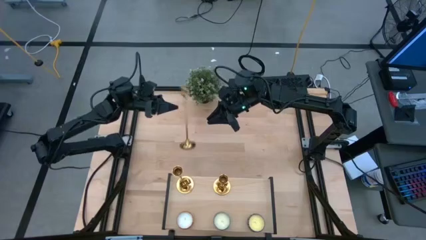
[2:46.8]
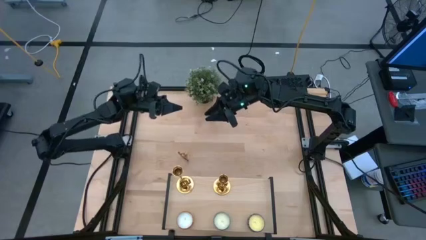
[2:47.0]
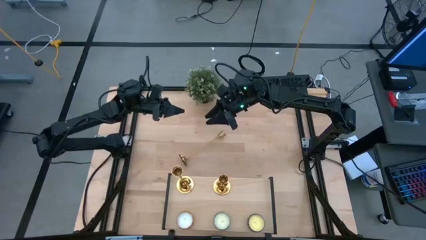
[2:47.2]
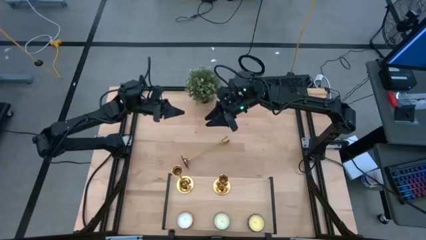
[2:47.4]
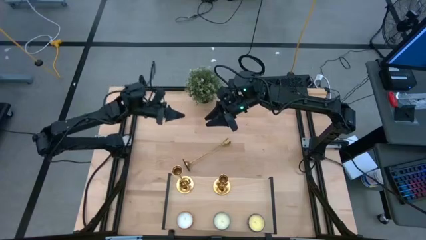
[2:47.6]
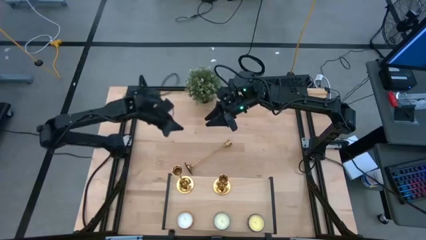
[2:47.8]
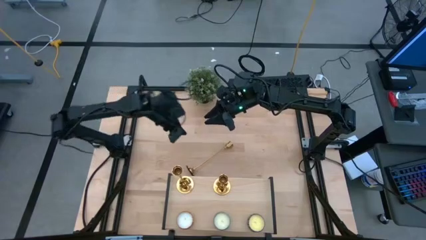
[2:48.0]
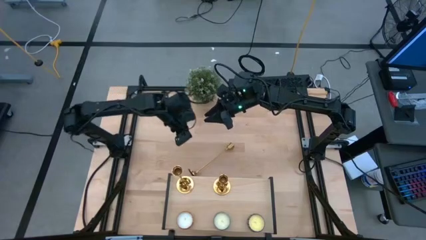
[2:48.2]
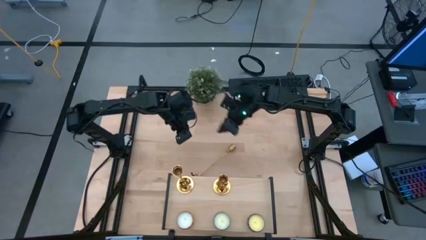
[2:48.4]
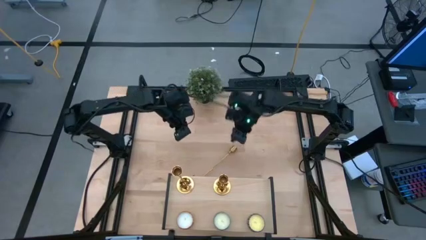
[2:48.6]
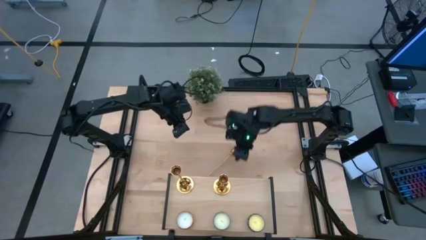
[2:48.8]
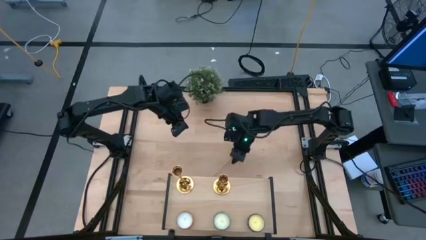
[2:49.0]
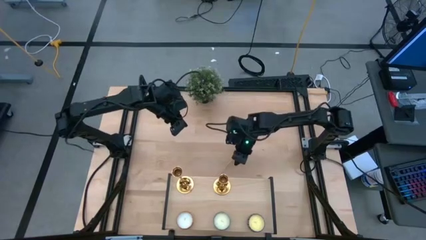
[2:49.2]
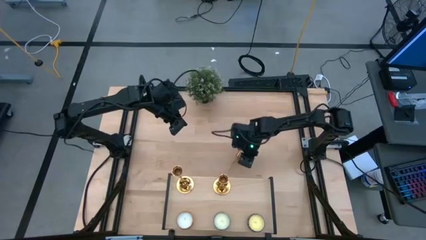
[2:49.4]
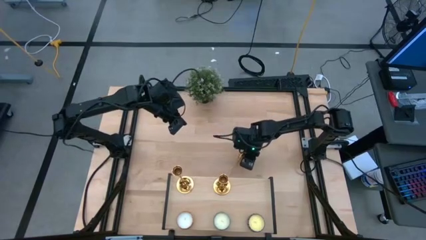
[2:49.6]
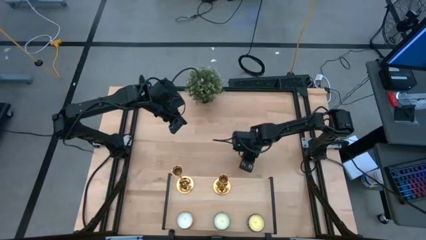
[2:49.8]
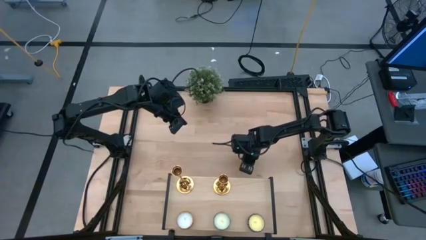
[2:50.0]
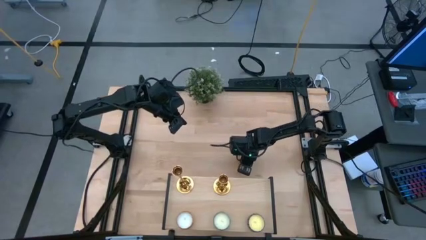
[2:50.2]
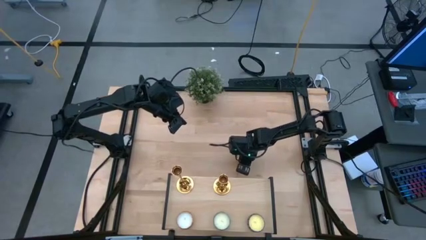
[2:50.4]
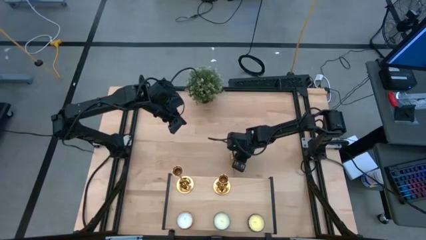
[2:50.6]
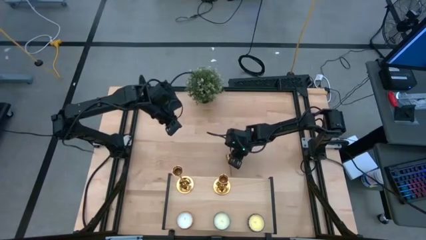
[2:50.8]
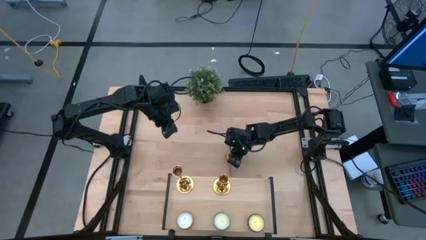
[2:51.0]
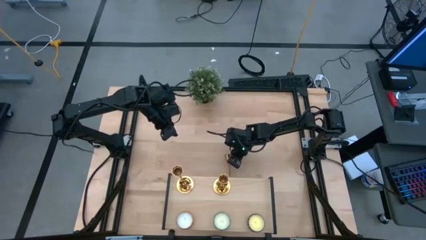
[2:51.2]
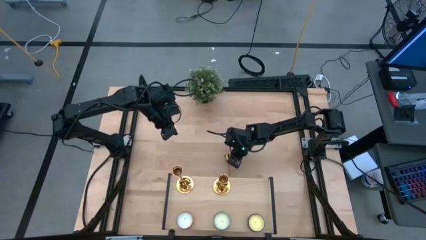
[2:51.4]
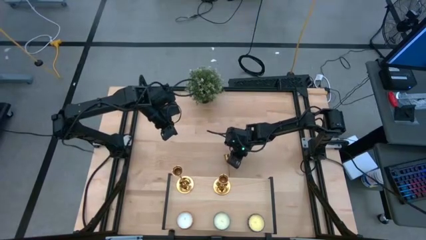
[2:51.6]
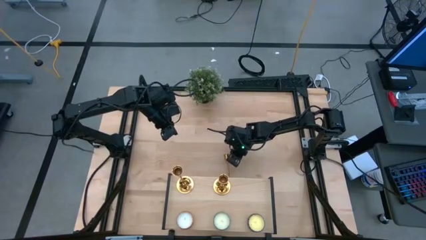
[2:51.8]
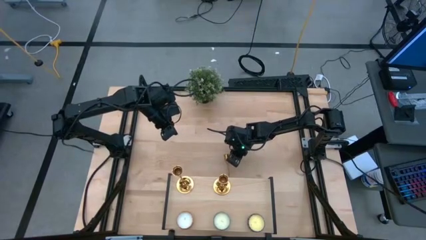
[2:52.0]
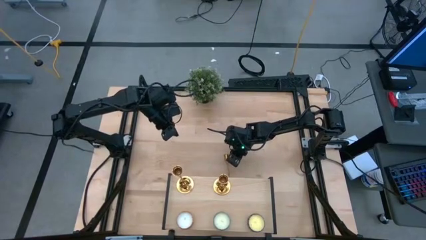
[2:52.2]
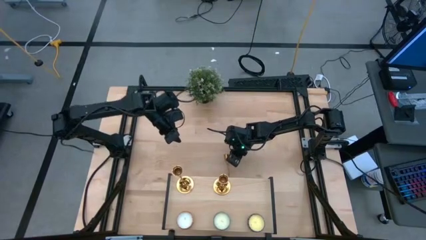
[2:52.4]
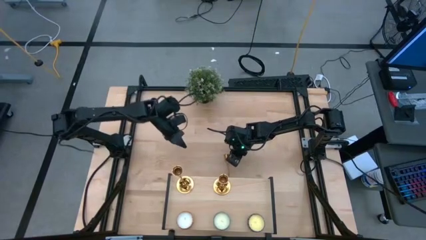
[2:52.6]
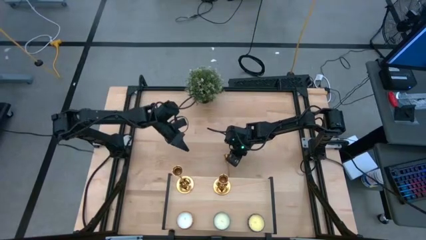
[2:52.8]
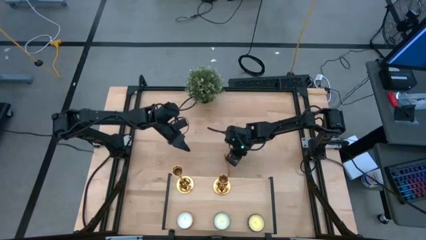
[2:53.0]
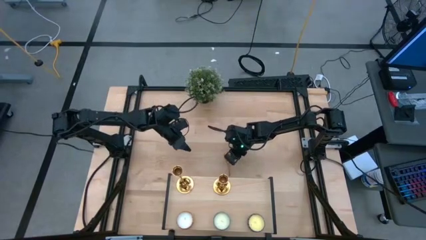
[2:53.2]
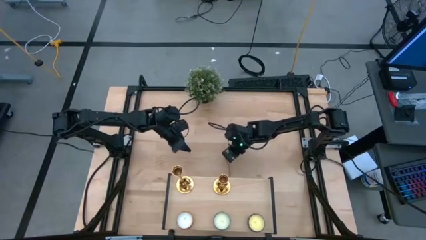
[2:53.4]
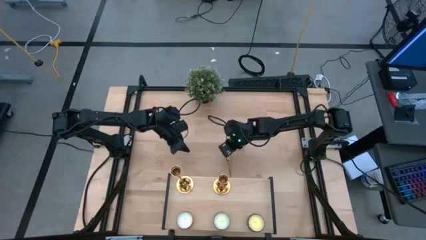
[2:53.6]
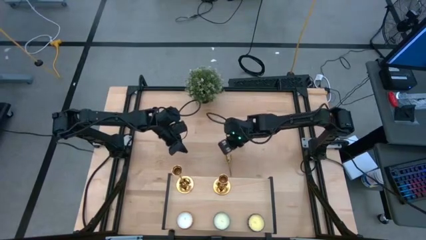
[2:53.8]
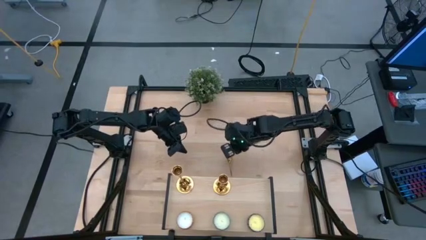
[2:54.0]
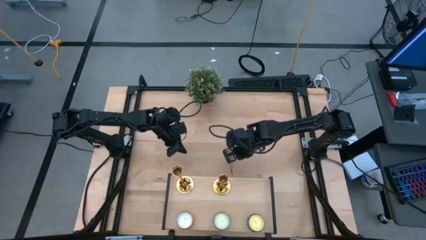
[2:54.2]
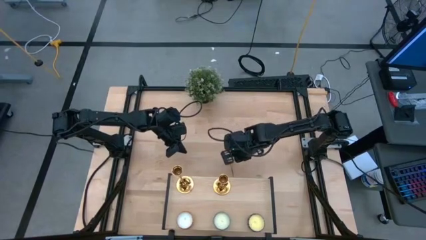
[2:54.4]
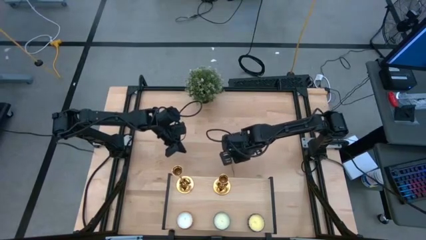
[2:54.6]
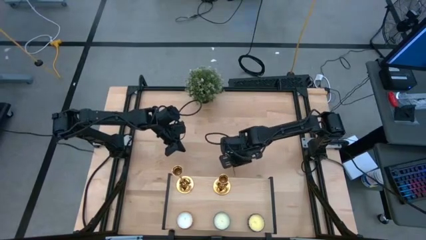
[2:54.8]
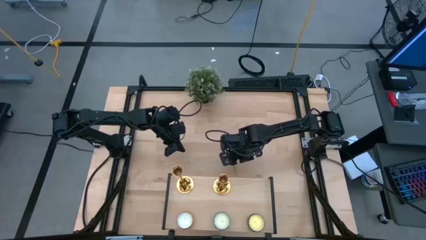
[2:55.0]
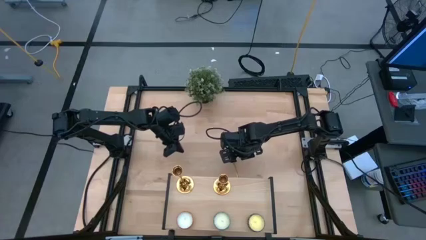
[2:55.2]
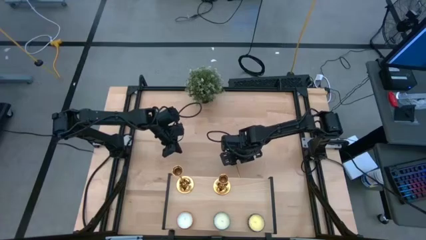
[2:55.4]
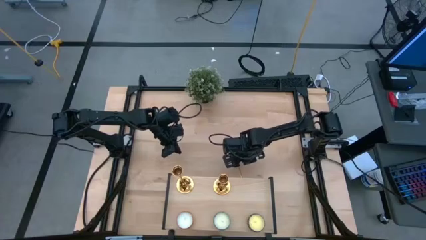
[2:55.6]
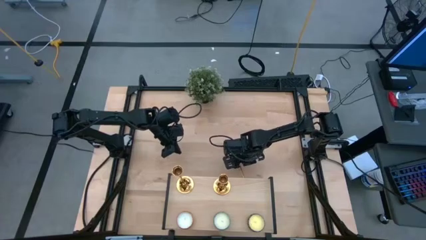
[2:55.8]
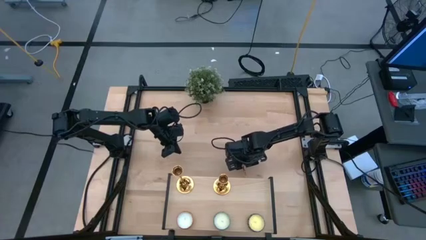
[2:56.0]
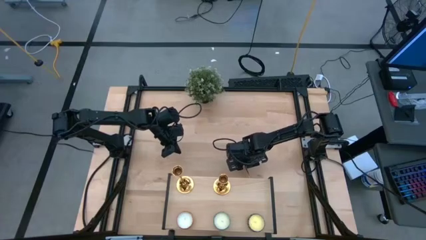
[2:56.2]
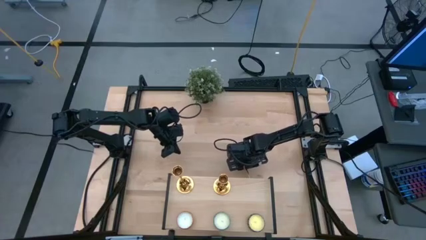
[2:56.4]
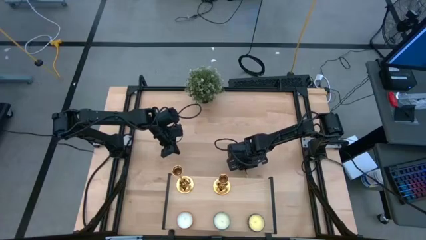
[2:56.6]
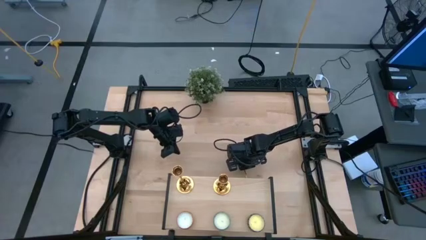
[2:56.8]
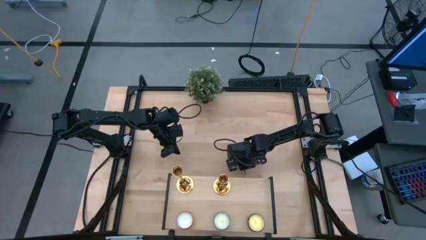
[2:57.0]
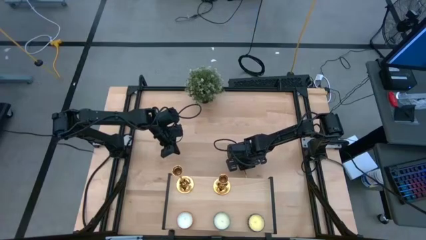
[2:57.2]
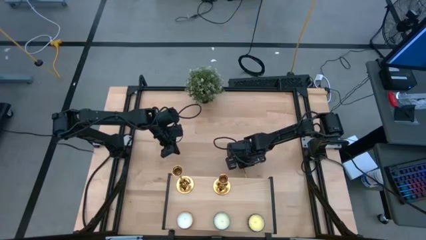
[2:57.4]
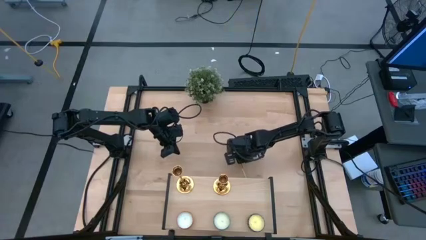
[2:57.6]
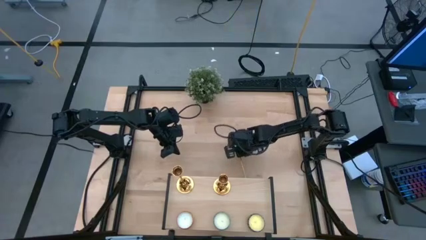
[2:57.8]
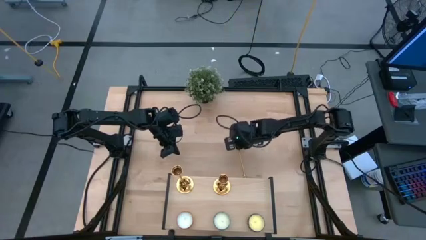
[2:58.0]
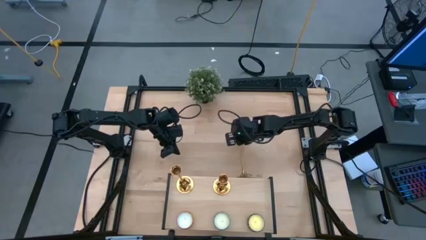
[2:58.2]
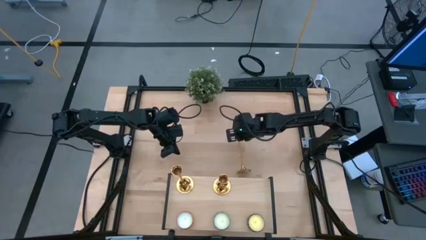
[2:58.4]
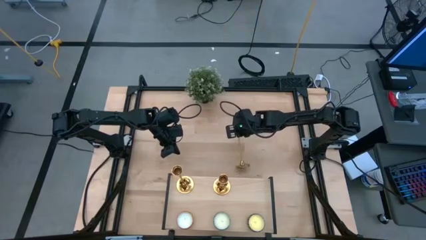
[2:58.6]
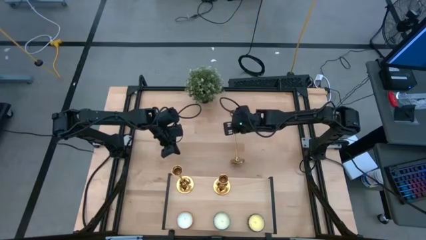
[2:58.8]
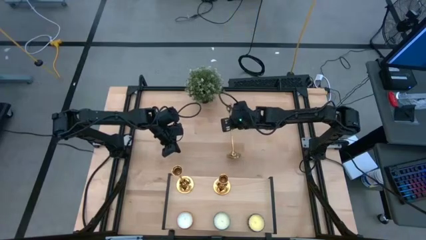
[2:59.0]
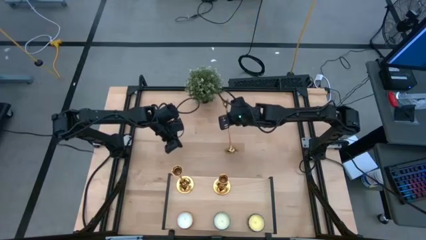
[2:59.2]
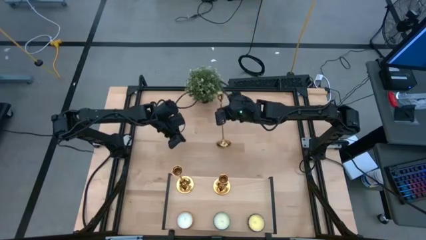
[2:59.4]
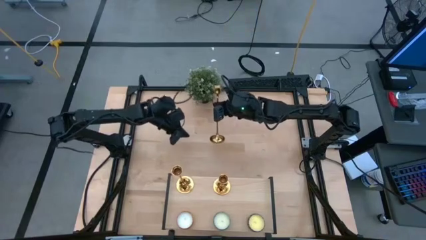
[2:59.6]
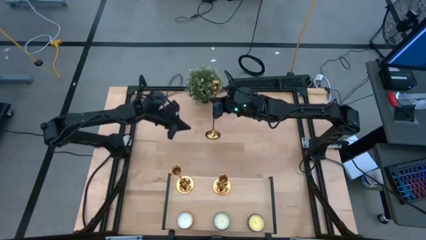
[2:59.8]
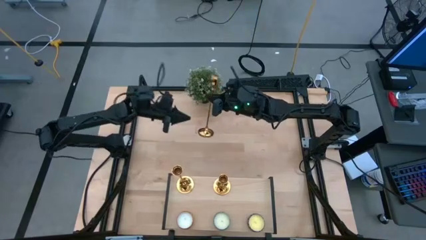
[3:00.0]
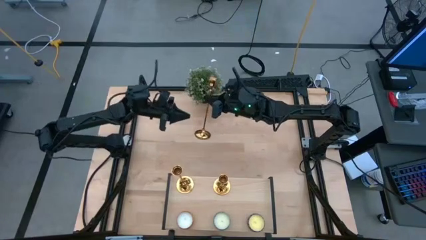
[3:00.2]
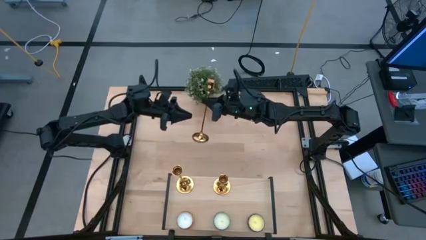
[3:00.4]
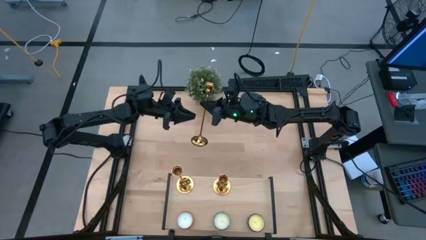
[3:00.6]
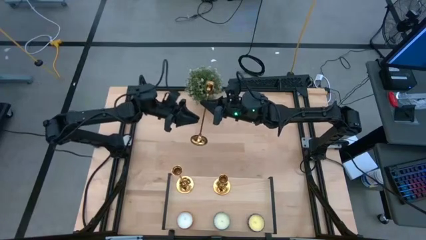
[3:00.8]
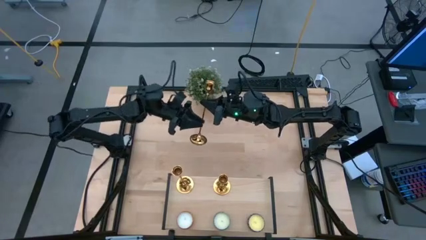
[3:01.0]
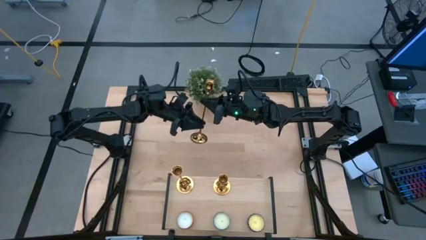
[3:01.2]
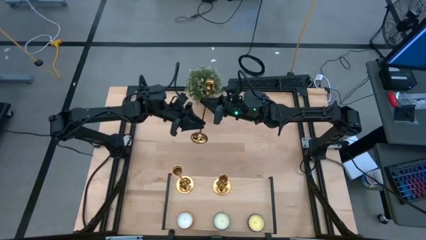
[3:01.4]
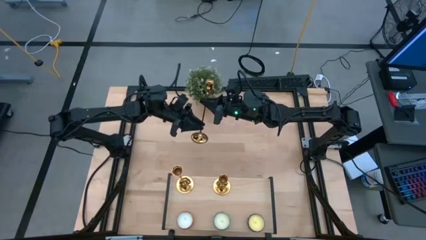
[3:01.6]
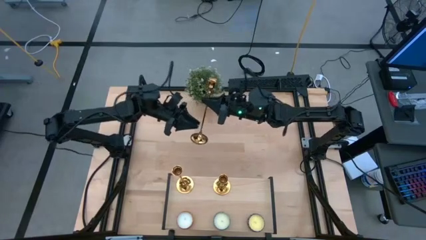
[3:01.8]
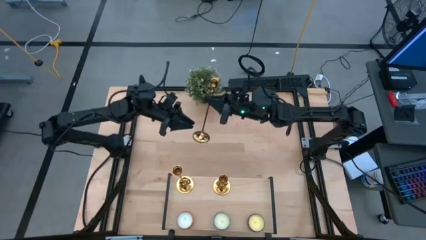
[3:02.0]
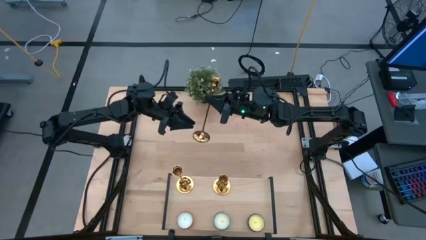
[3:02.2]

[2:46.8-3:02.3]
Task: Pick & Place candle stick holders
Put the gold candle stand on the shelf

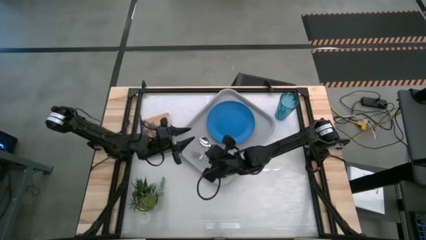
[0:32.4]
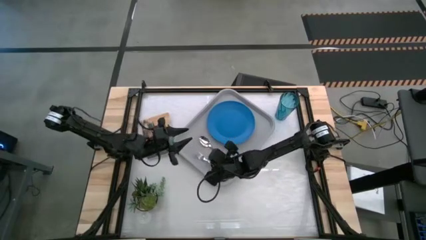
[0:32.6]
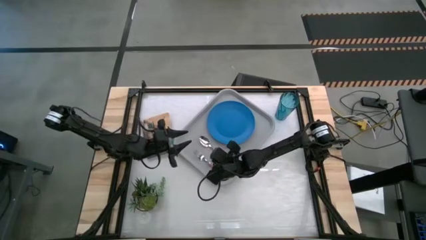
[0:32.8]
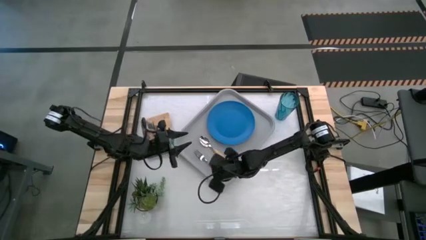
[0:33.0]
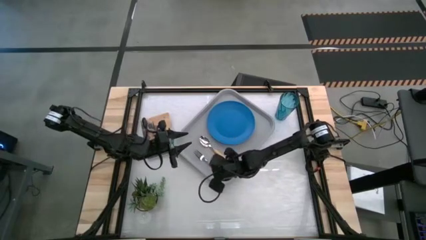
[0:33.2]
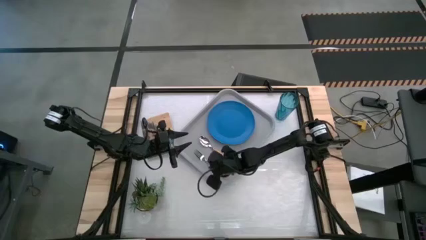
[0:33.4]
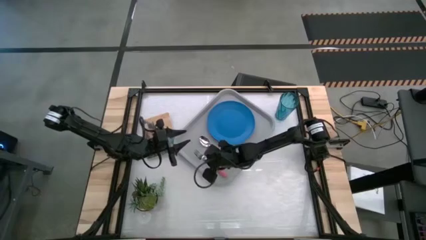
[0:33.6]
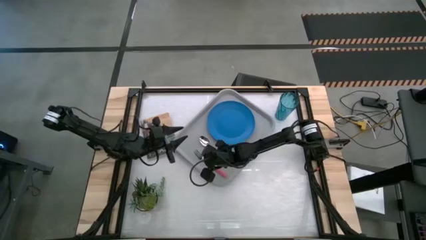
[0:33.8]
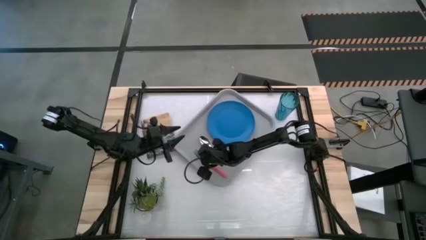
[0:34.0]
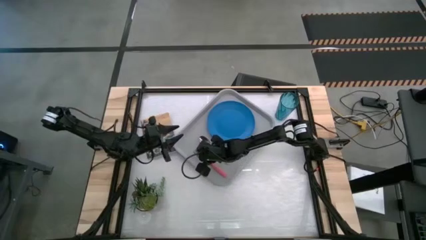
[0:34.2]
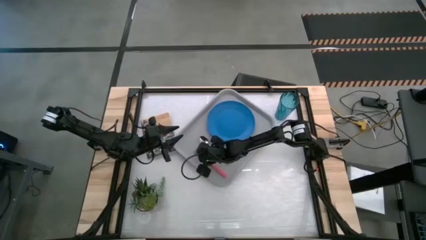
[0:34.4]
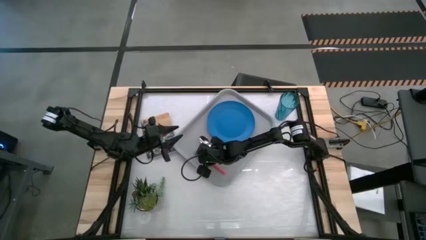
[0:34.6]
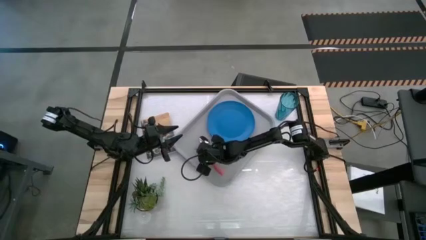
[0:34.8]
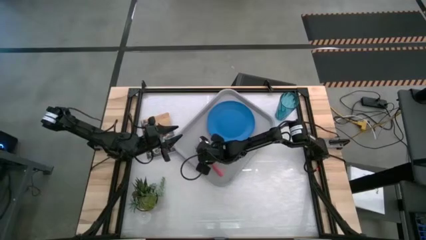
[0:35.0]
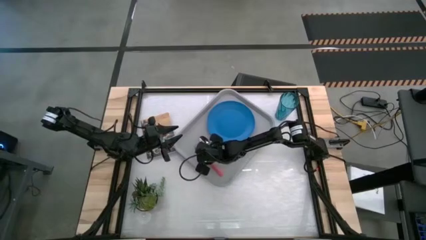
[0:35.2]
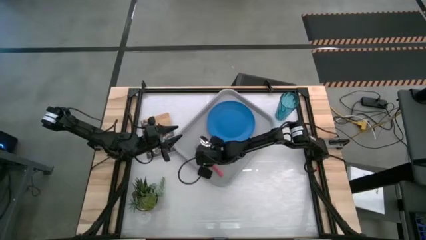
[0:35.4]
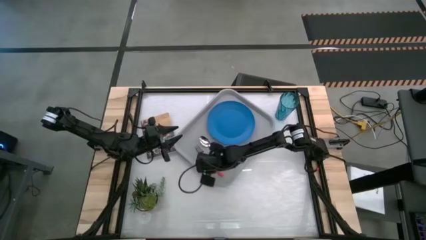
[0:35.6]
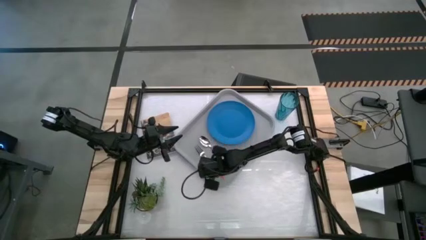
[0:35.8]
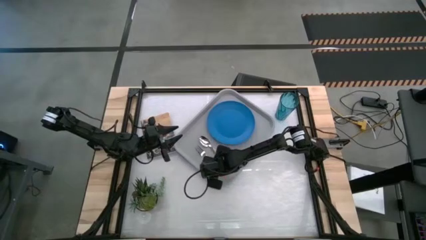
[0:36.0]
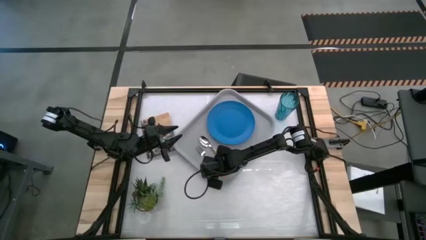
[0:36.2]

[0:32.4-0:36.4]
Task: Pick and place plate/cup/fork/spoon on tray
Put the pink fork on the gray serving tray to the left of the blue plate
